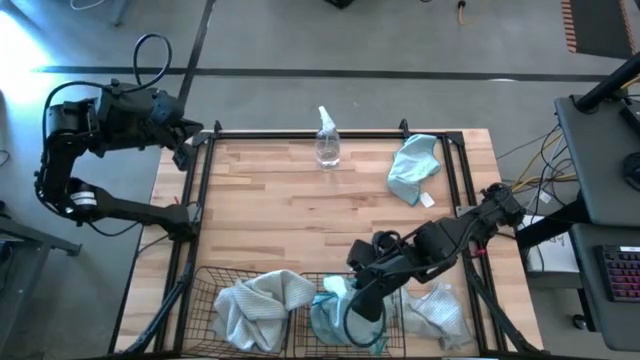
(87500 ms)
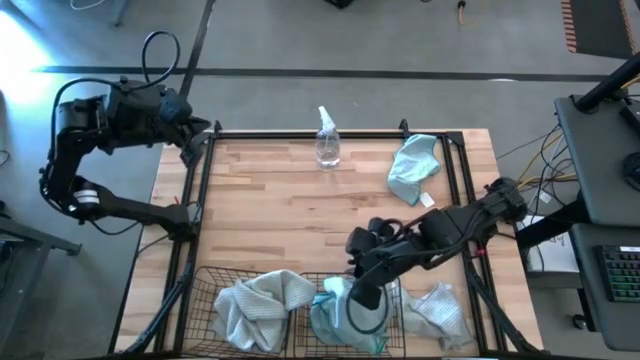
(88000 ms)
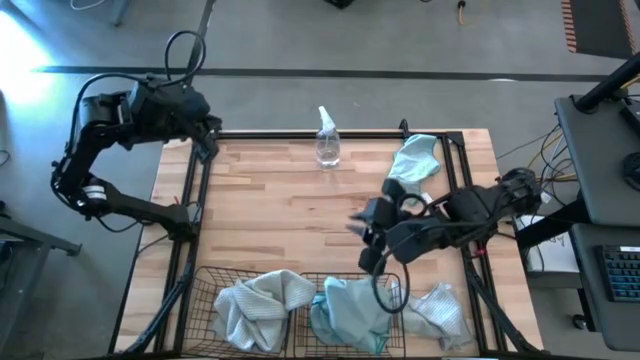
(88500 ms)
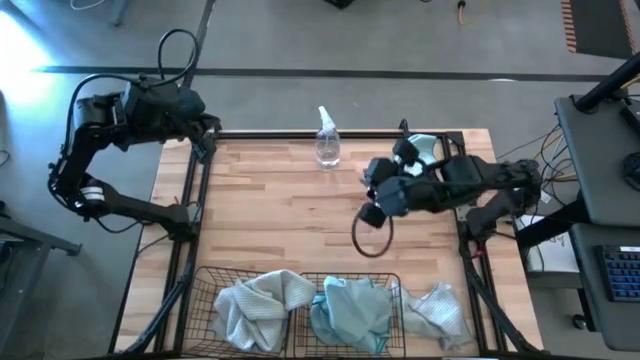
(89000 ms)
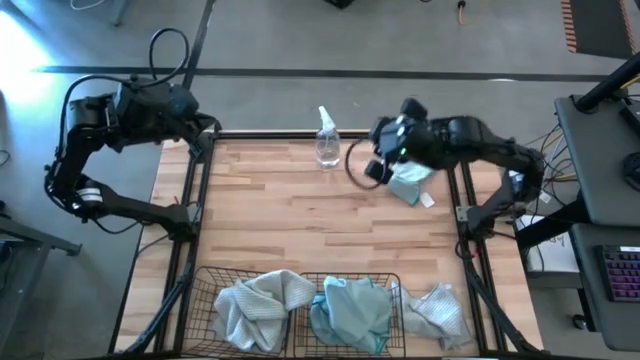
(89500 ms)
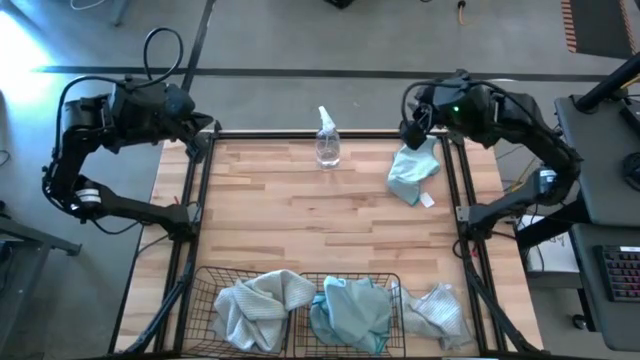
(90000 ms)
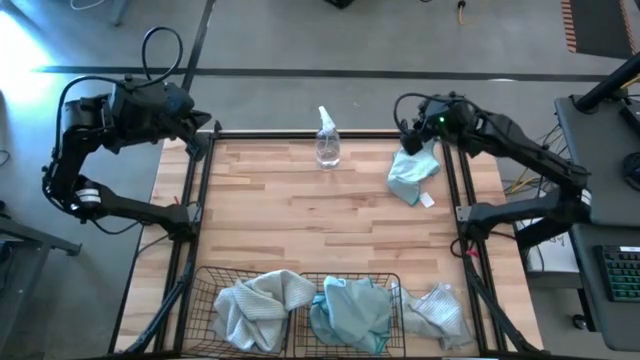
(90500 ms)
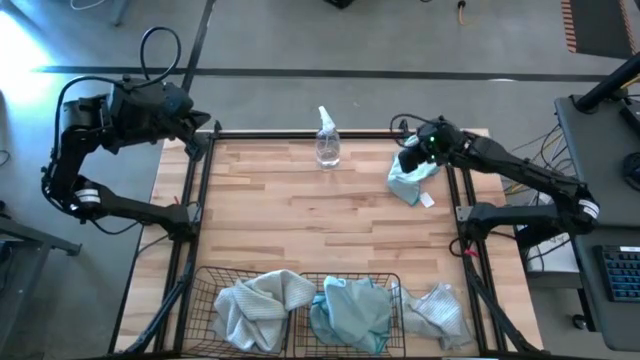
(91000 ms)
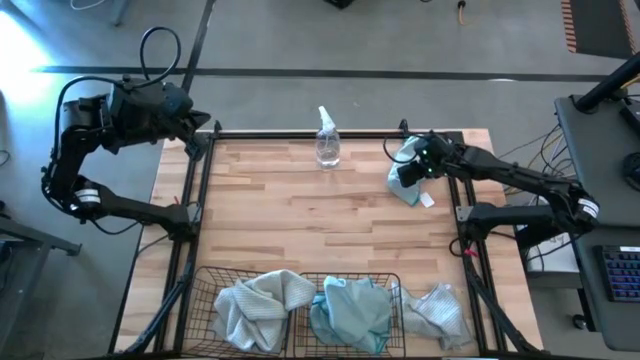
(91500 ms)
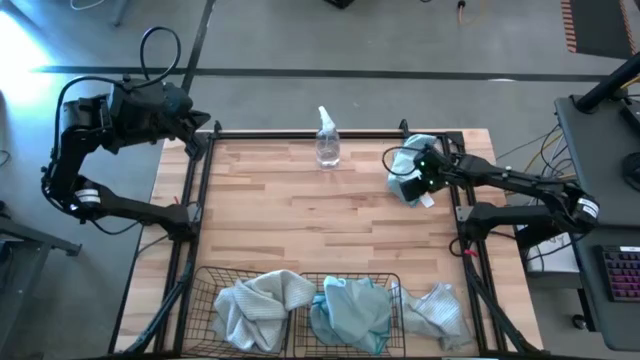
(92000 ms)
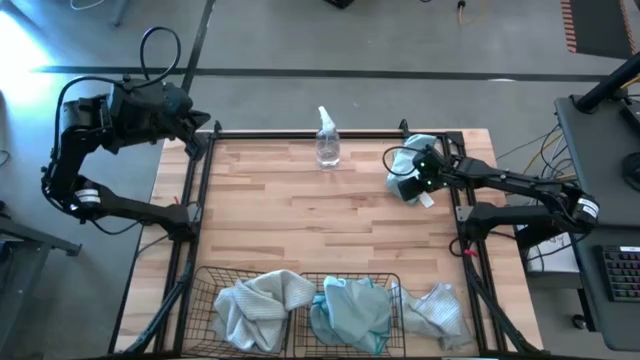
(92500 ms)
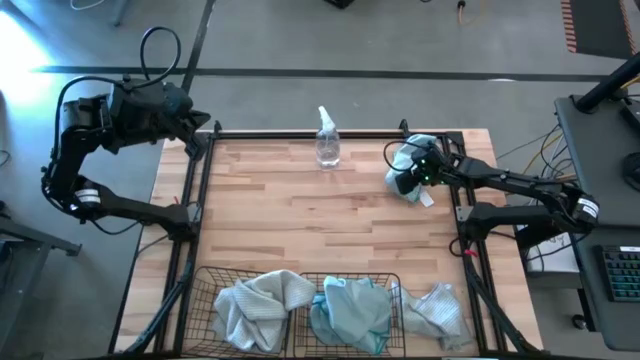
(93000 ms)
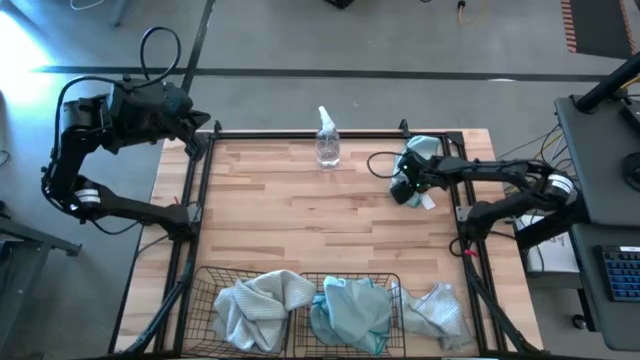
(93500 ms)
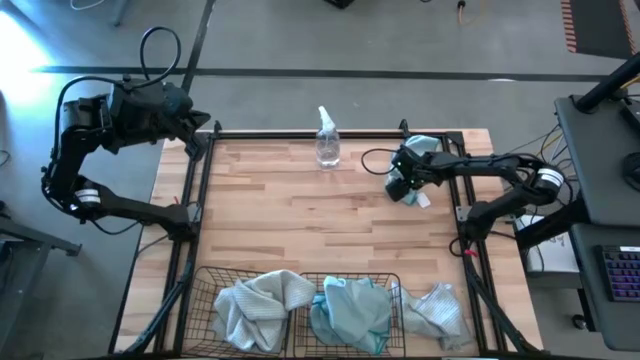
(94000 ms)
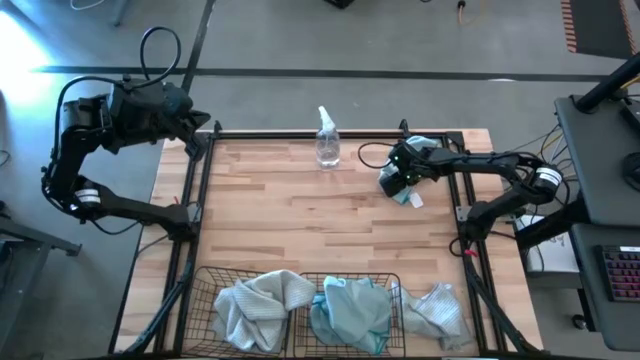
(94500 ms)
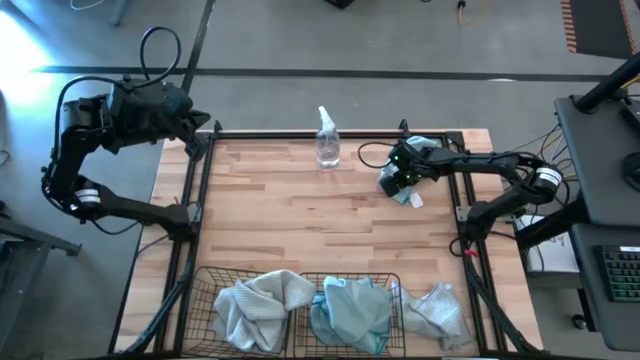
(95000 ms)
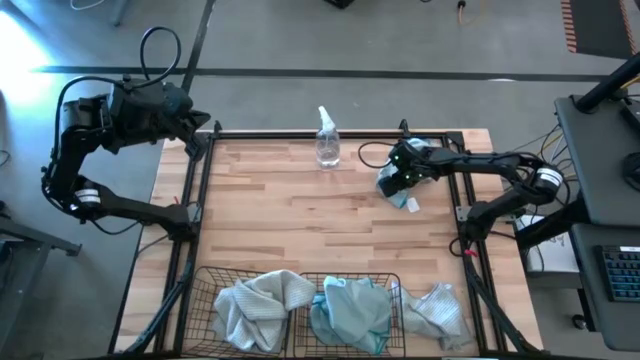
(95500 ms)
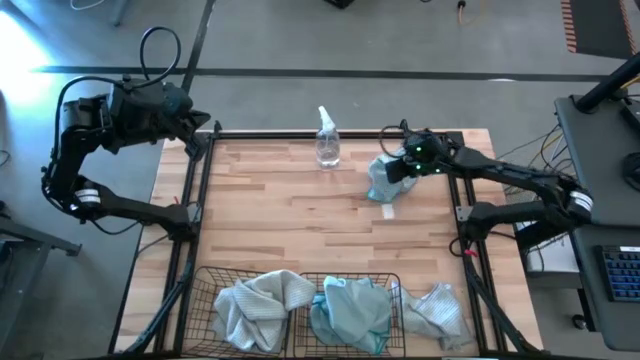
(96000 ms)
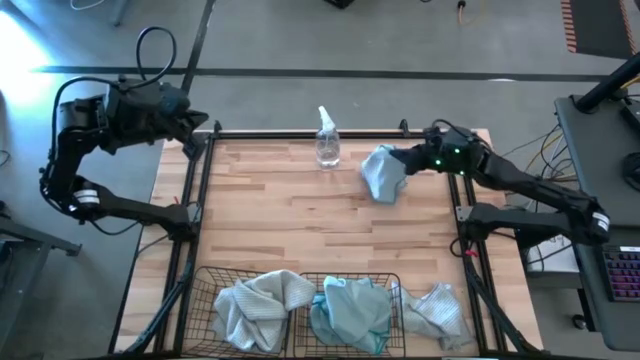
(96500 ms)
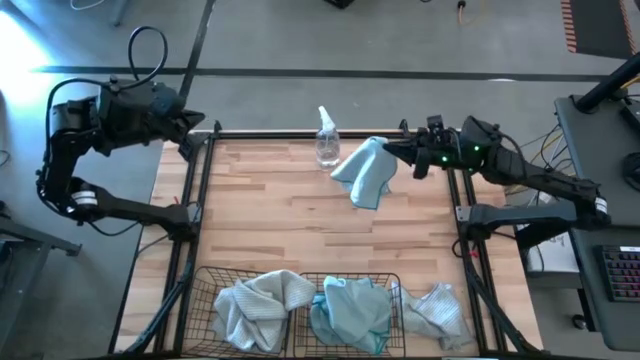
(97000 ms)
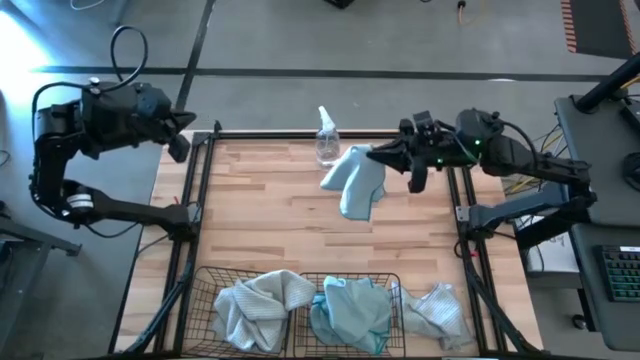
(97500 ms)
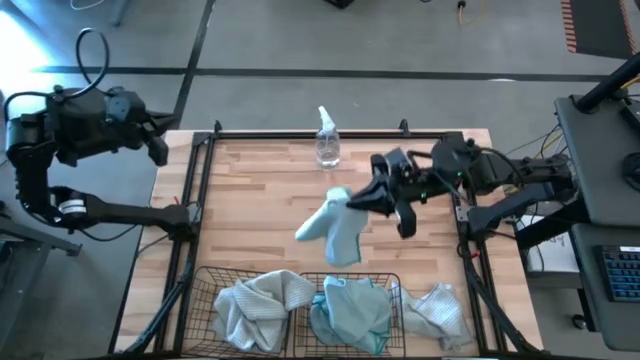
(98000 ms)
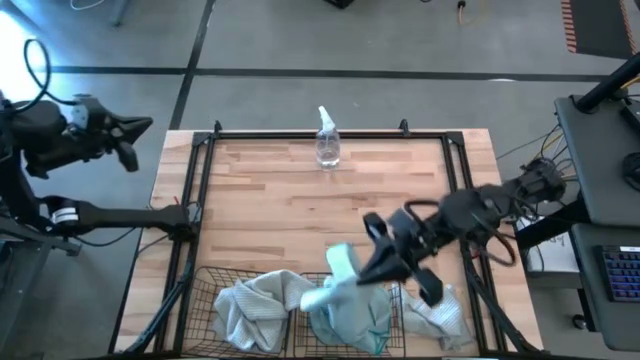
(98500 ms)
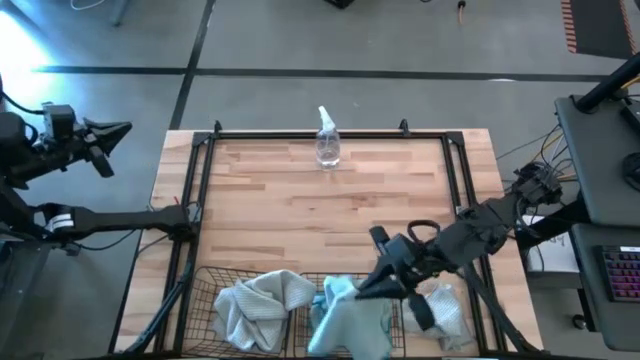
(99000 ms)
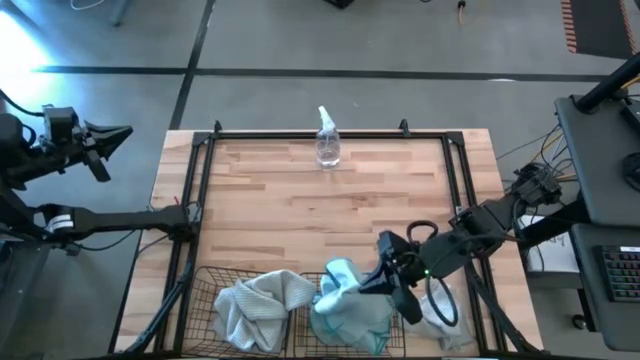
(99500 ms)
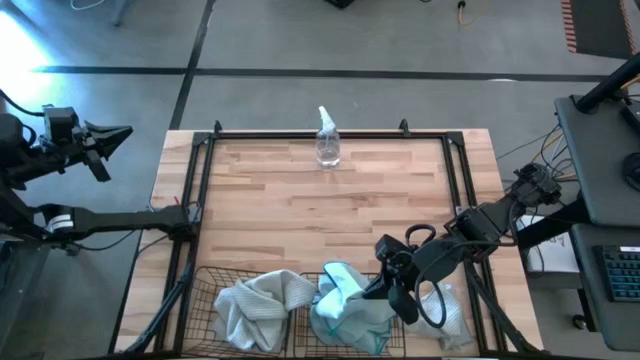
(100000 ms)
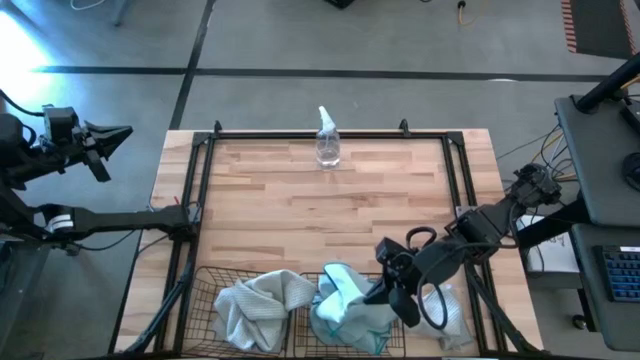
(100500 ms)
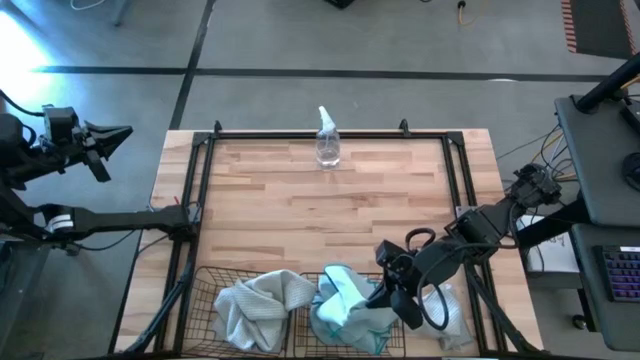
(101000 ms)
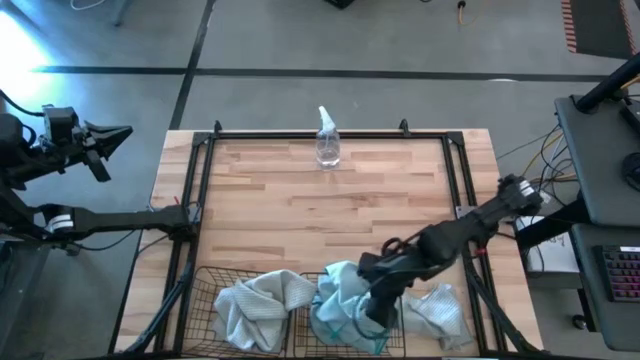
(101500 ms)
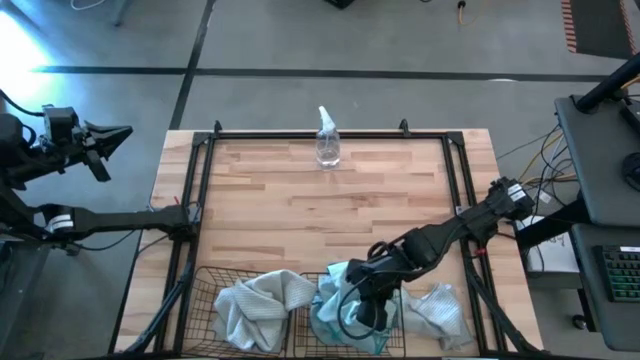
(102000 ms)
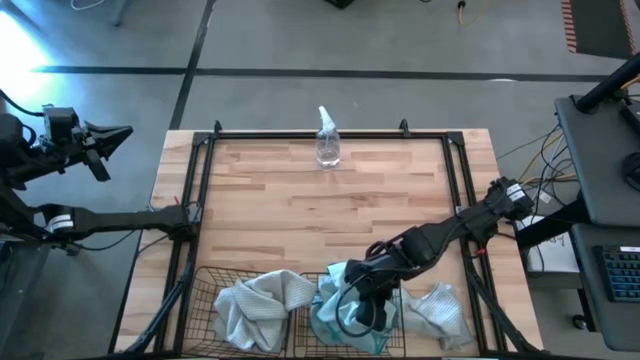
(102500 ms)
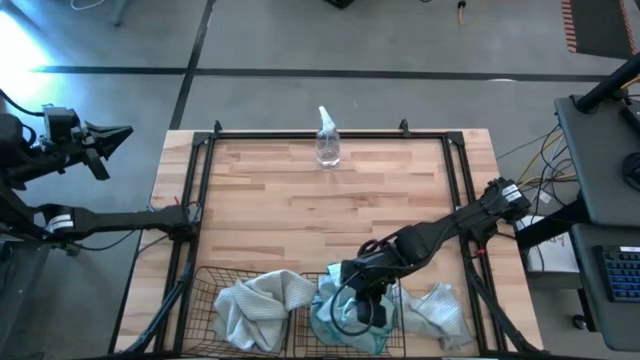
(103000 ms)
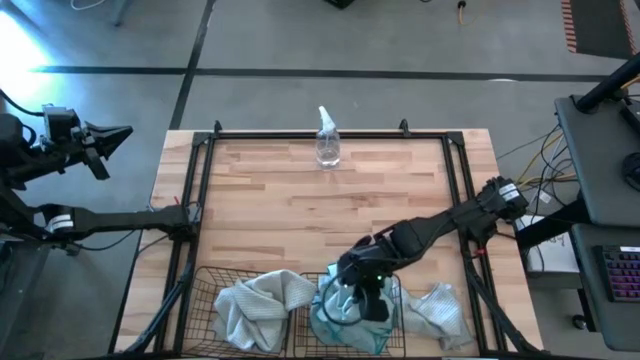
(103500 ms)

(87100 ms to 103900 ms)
Task: Sort microfiber towel by color & place in baskets
Put the blue microfiber towel into the right black wire basket

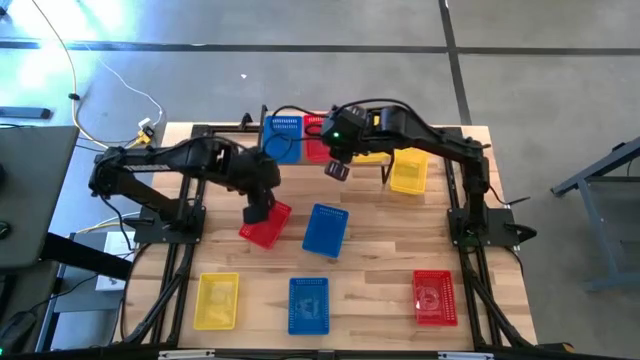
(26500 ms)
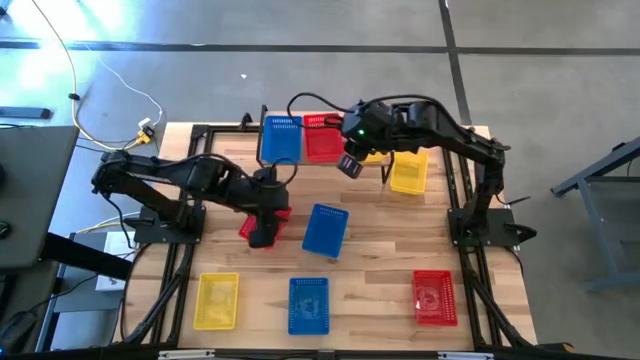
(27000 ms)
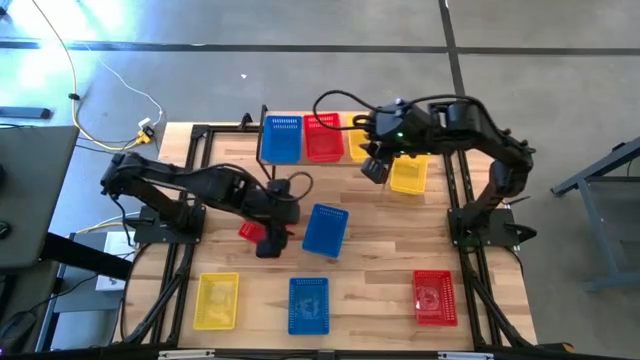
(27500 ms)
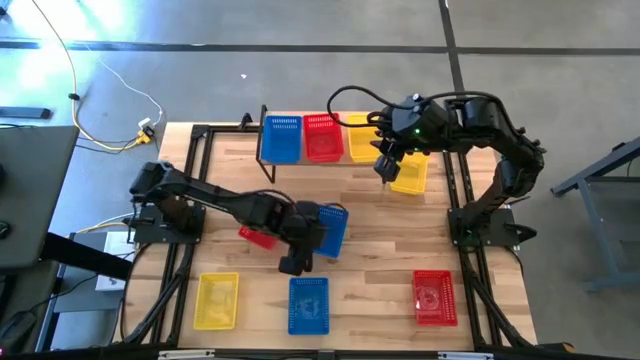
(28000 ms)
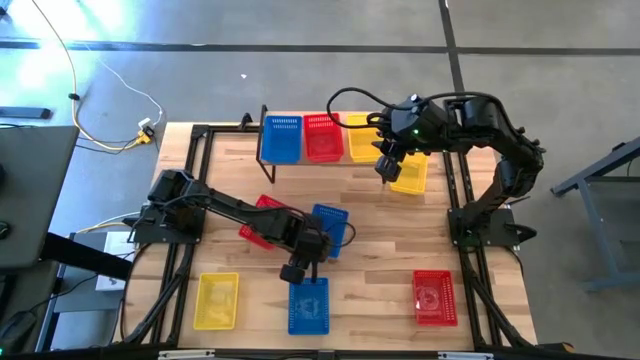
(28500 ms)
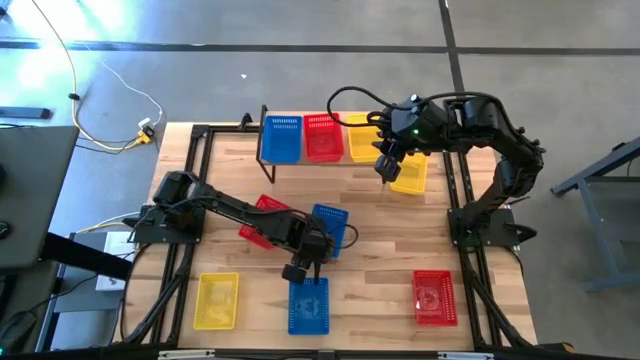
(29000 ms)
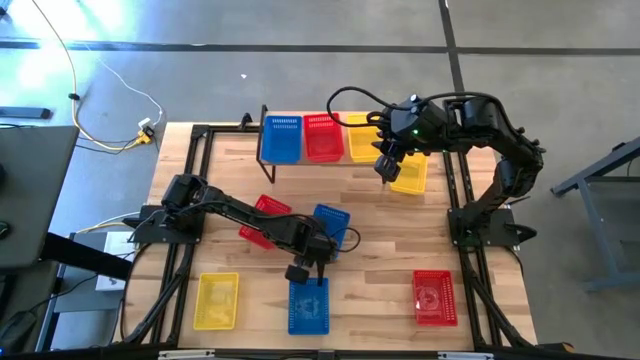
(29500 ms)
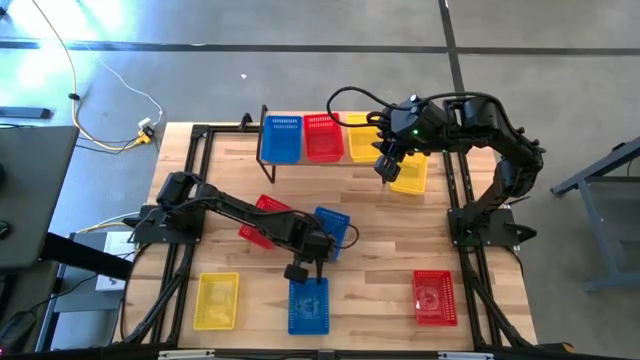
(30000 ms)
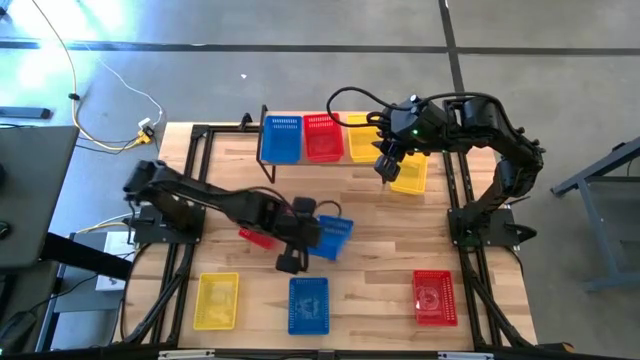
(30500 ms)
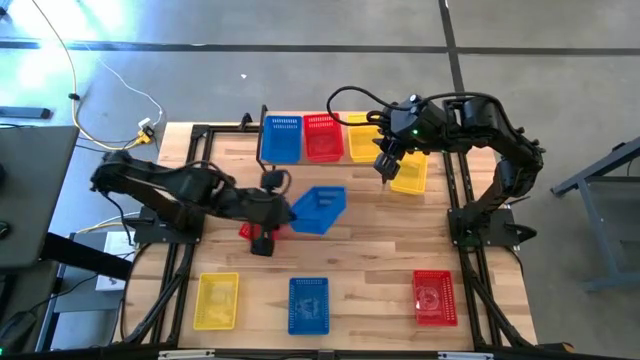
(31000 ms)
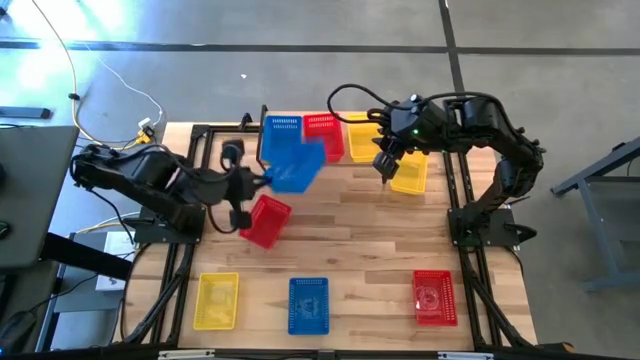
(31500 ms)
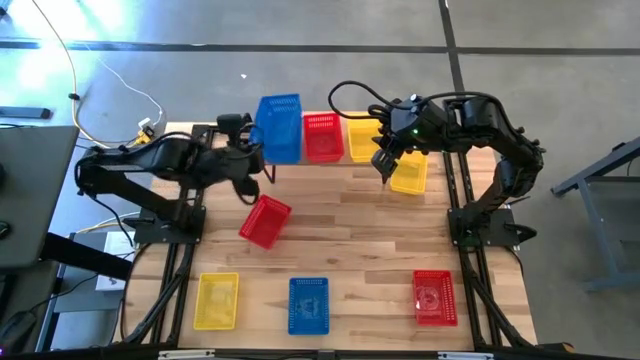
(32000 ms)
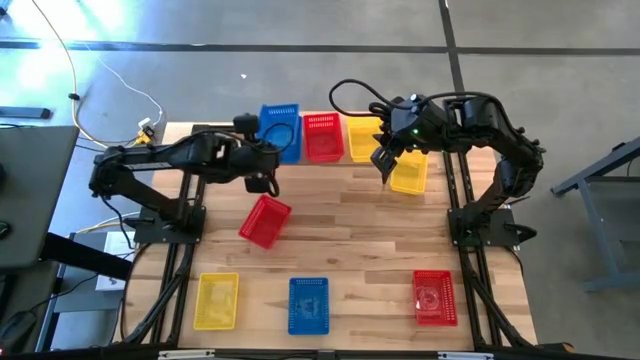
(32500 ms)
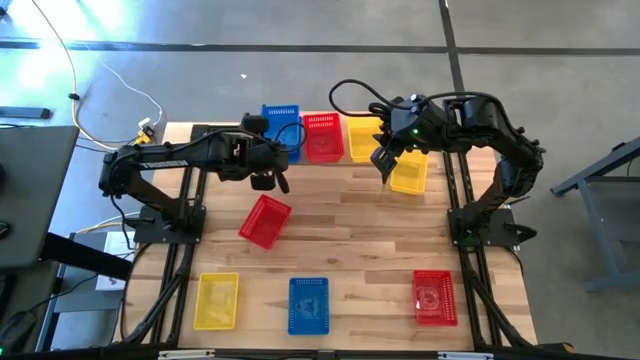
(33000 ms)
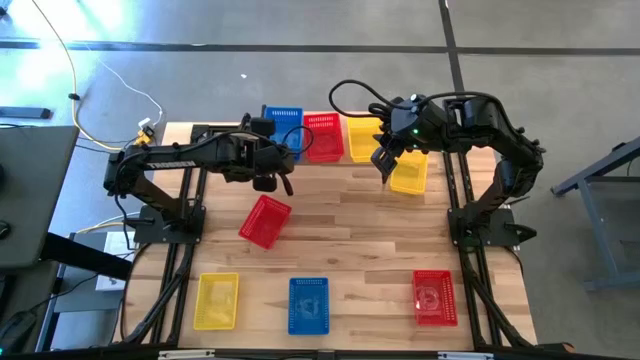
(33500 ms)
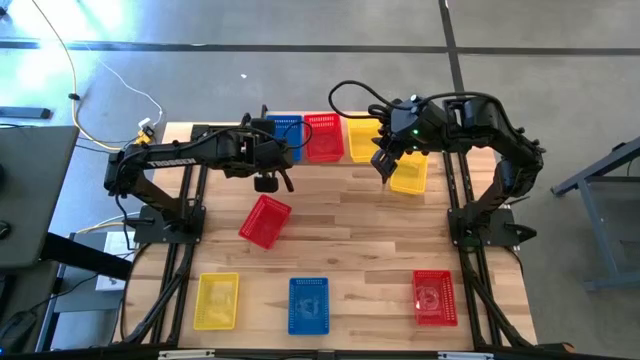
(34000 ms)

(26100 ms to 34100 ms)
Task: Stack baskets on shelf by color
Stack the top blue basket on top of the blue basket on the shelf
